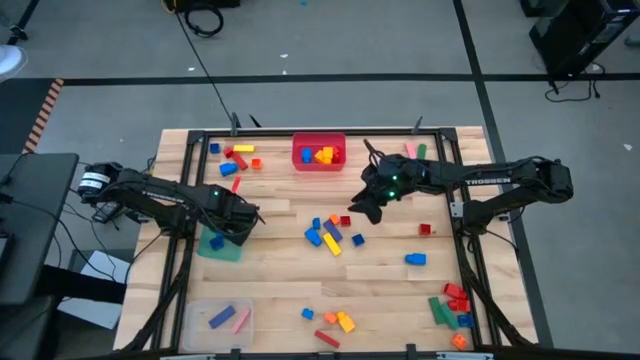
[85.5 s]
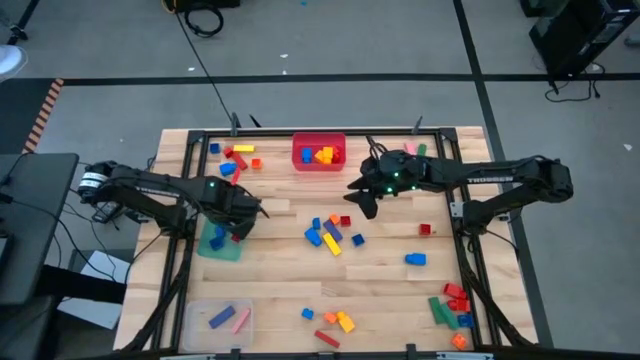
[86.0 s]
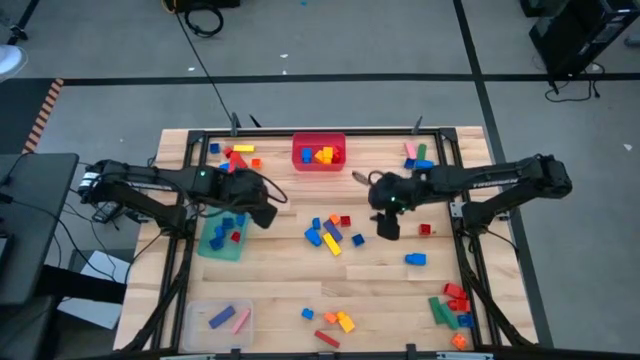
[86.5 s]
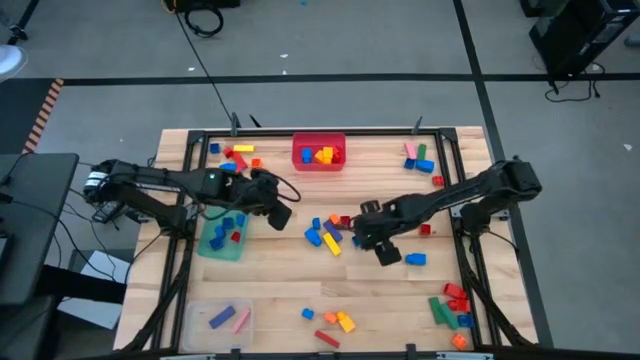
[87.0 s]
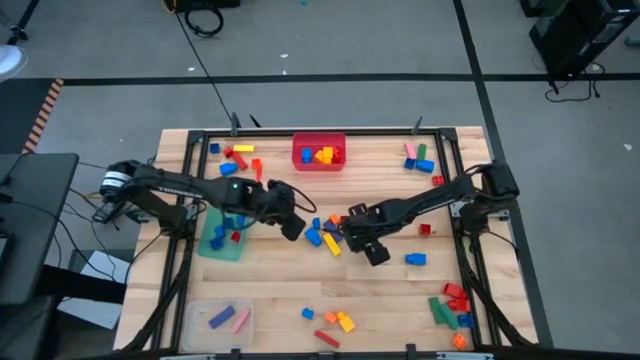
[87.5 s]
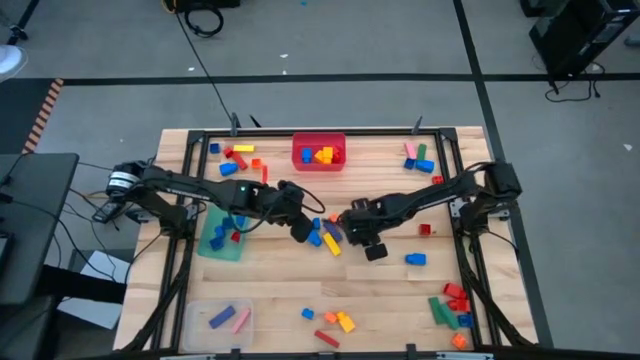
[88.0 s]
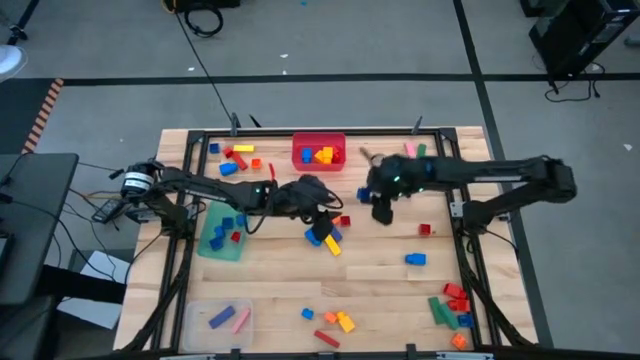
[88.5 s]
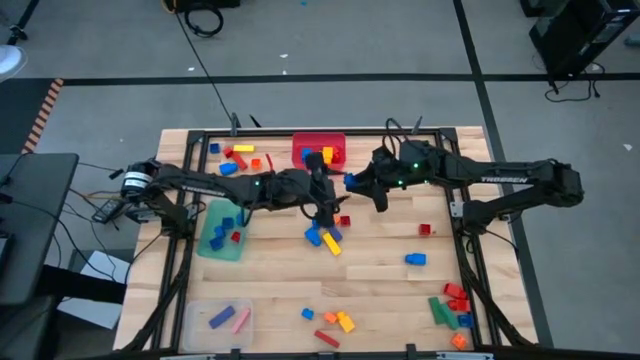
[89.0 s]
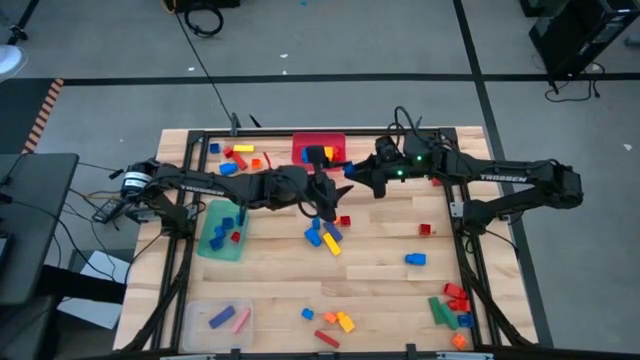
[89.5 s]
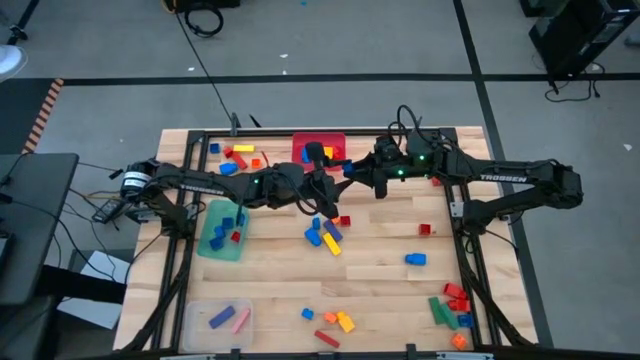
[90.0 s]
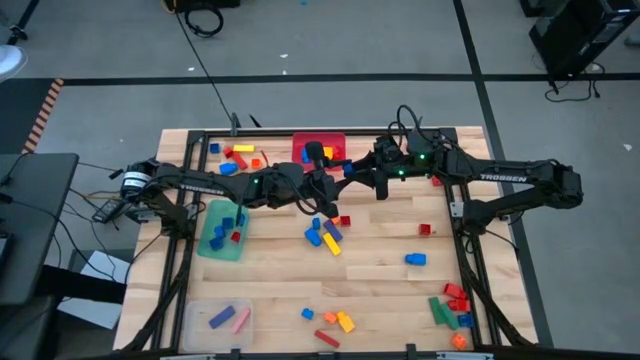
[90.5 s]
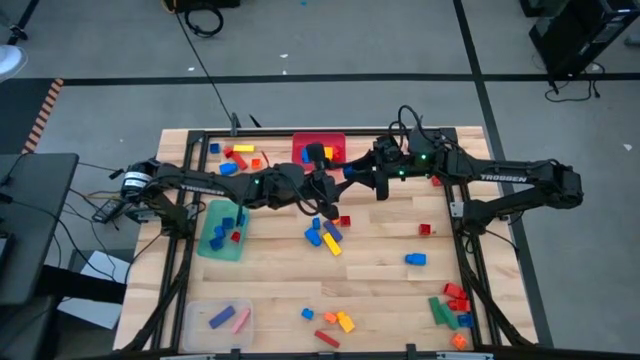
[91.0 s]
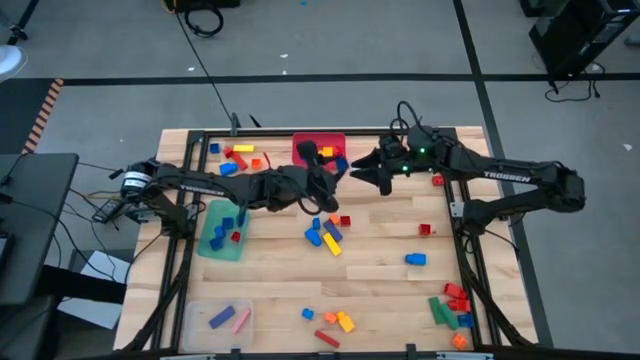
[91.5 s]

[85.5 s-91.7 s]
Task: Sort blocks by size
Put the blue 4 studded building block into the teal bin

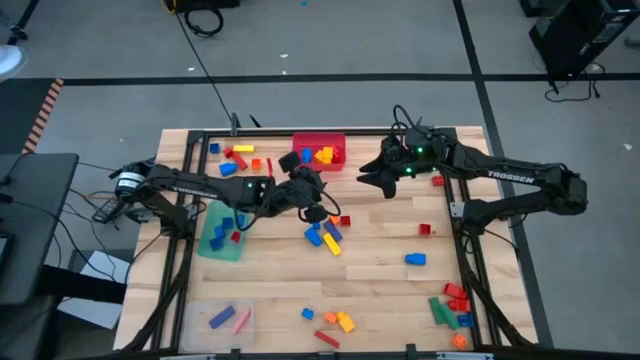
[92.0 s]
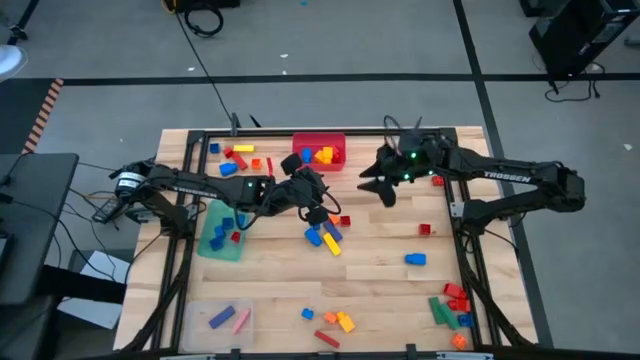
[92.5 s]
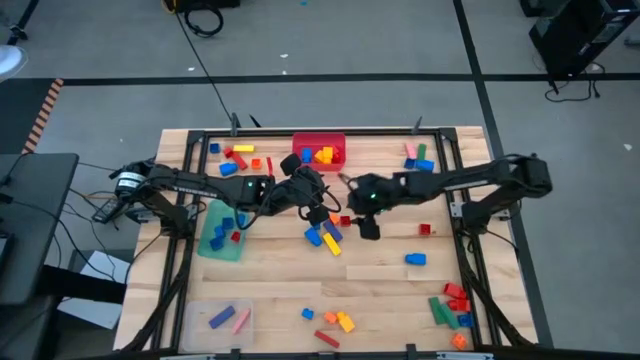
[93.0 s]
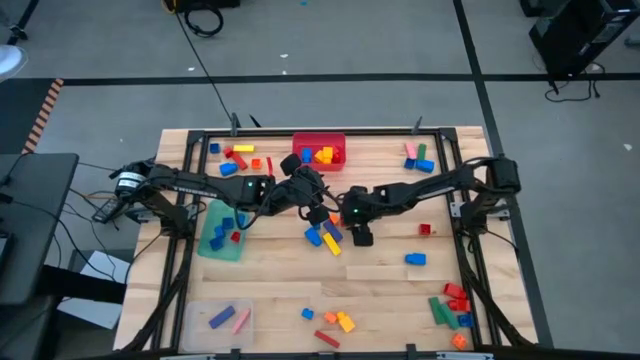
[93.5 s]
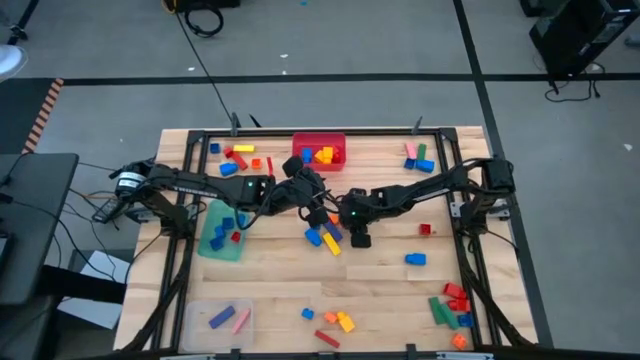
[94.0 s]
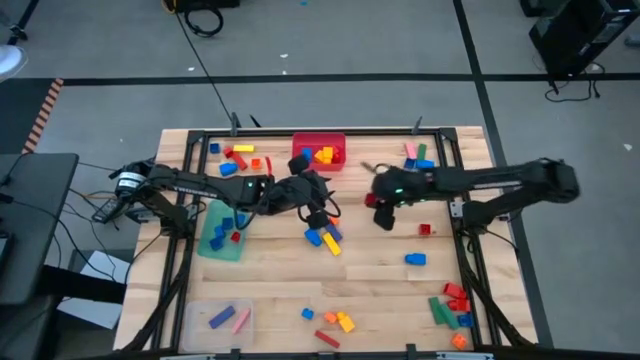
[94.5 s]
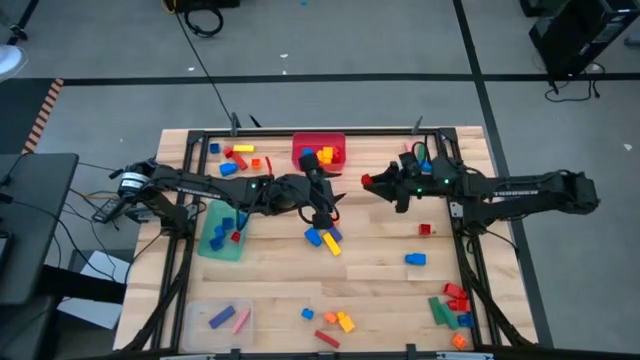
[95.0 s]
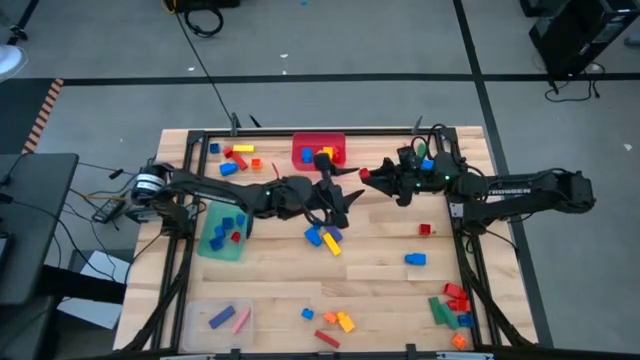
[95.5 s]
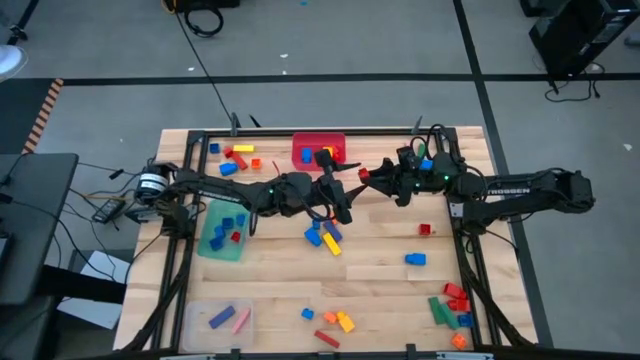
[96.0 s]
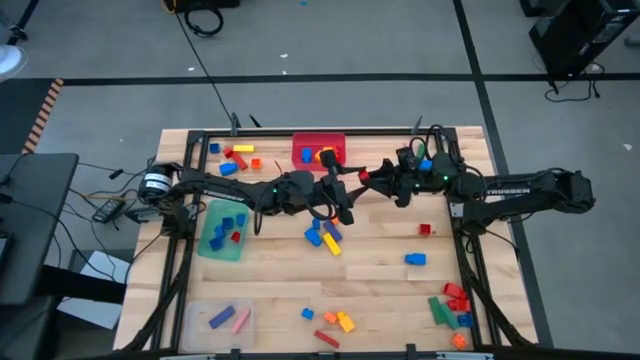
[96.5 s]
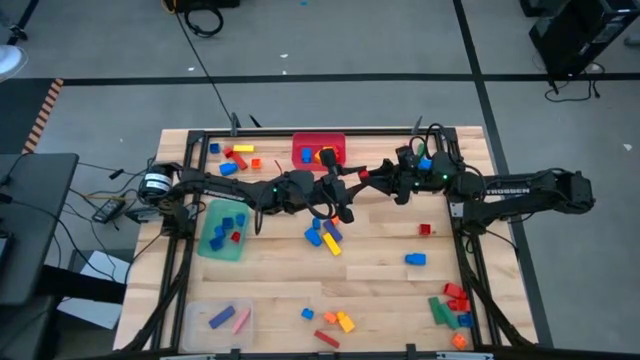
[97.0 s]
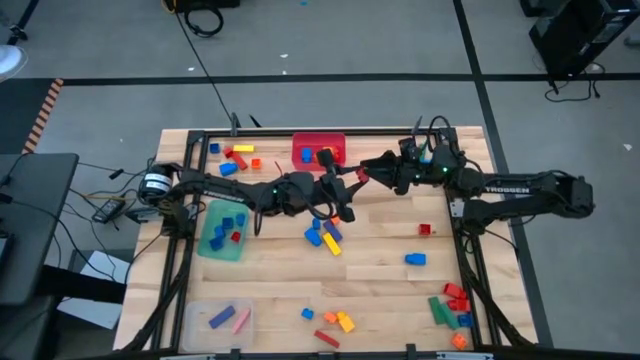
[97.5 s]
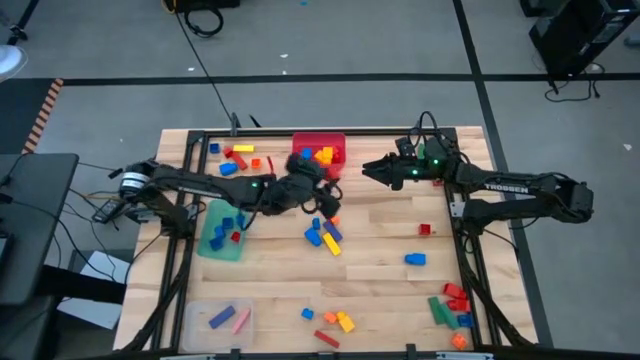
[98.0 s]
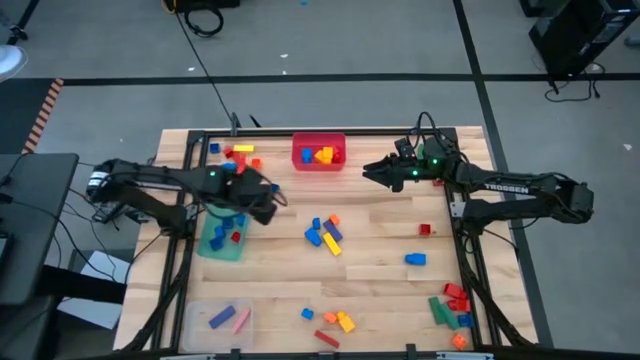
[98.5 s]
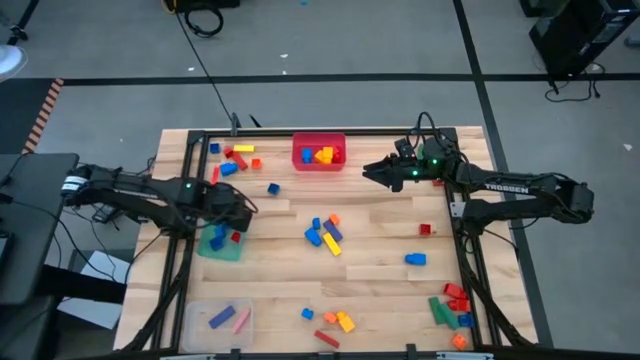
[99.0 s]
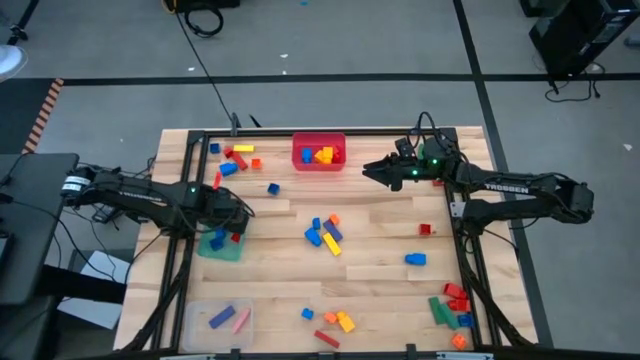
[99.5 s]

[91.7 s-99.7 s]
Put the red 4 studded building block into the teal bin

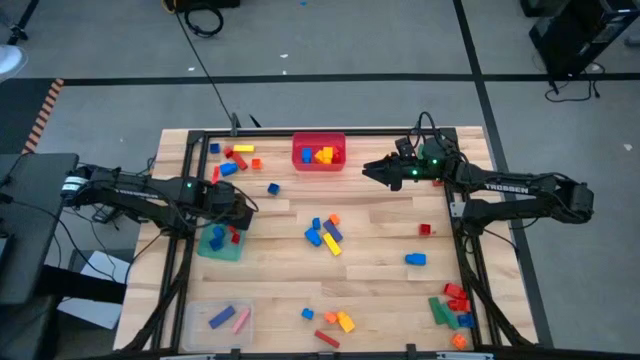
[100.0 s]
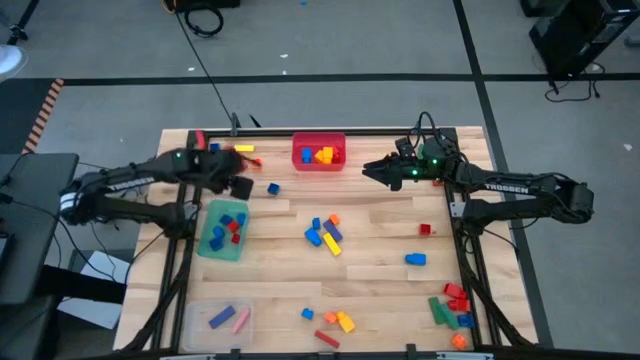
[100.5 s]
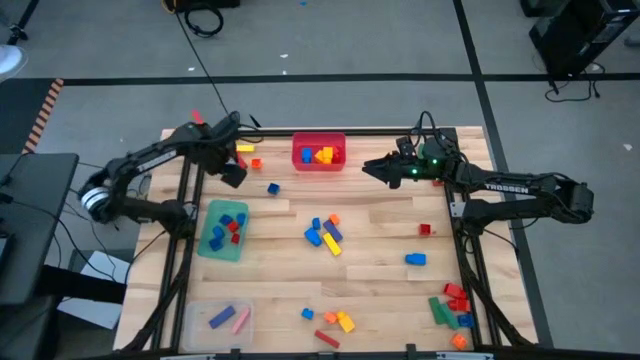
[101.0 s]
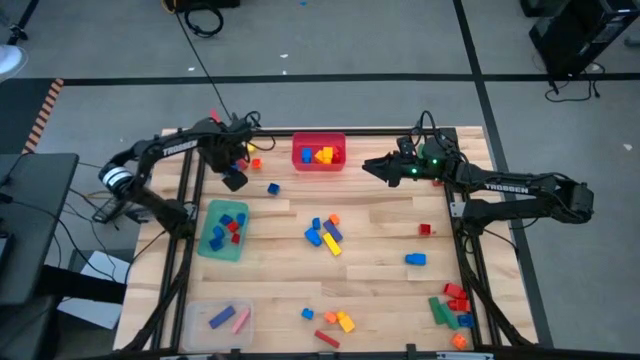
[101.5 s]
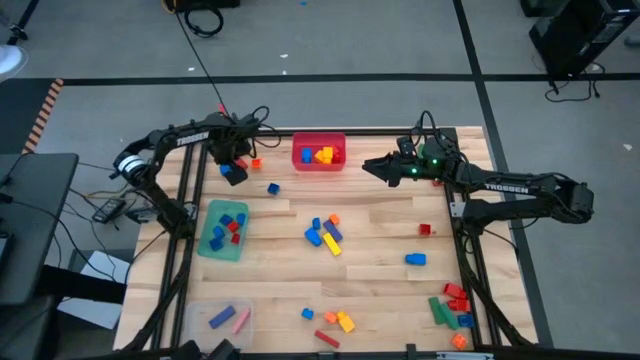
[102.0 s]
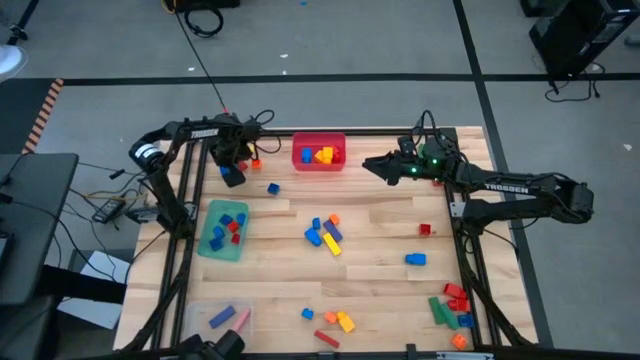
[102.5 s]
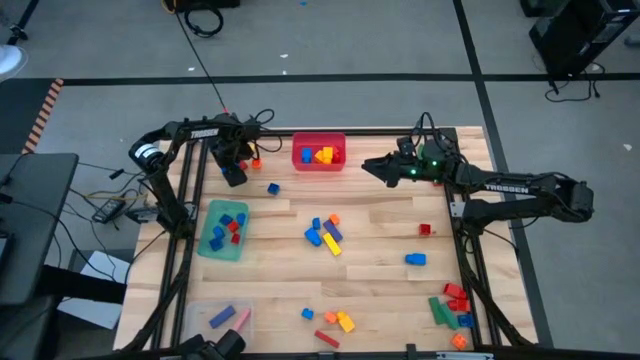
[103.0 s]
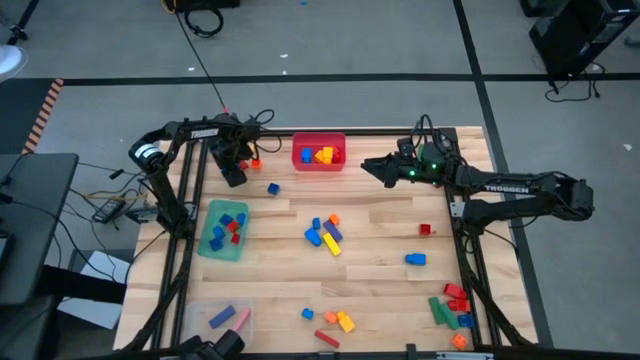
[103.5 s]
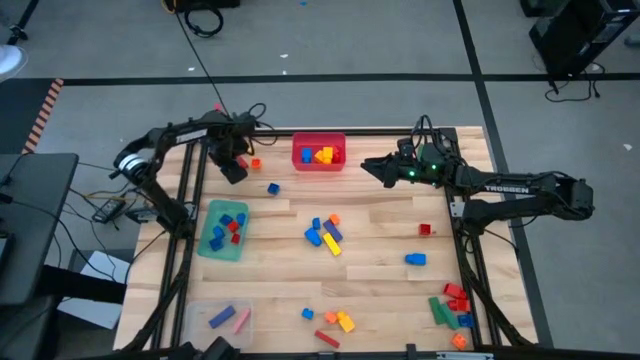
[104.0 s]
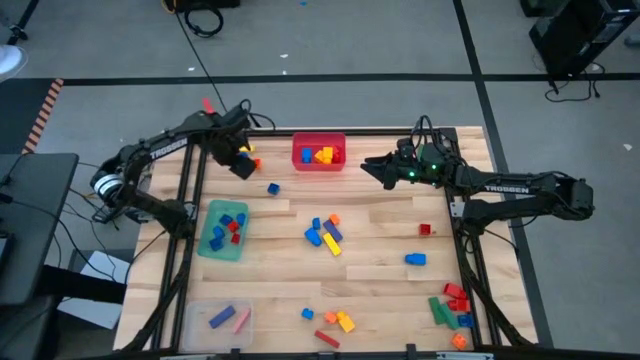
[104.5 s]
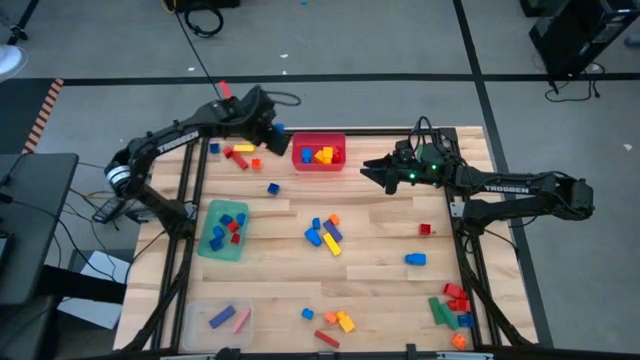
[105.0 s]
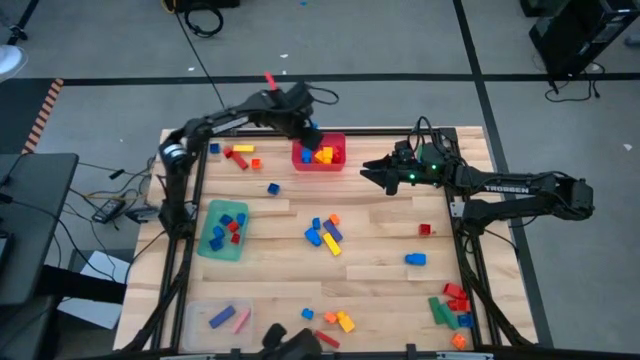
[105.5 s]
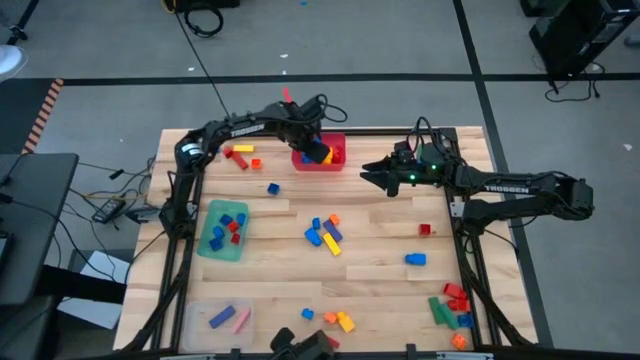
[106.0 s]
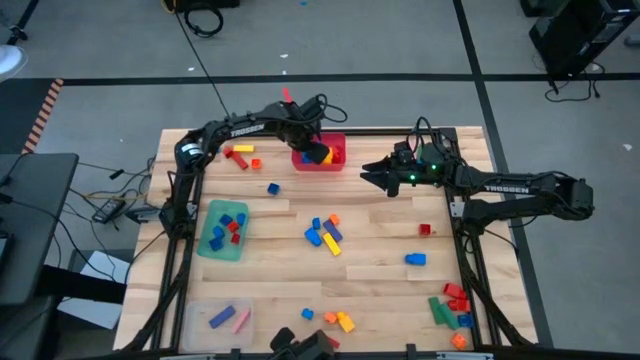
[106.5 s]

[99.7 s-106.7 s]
Put the blue 1 studded building block into the red bin

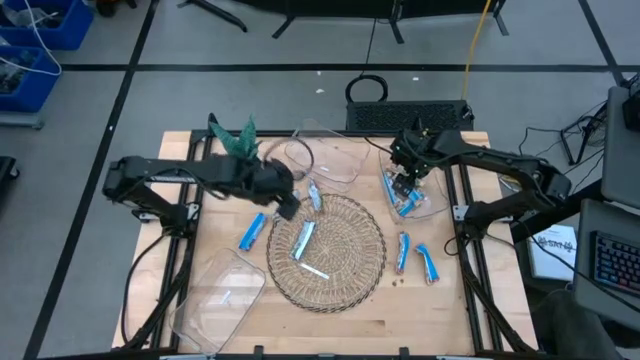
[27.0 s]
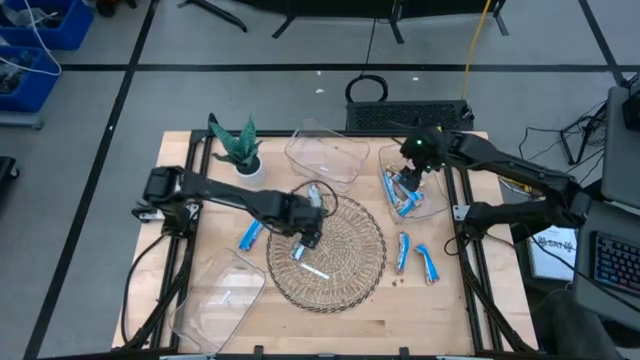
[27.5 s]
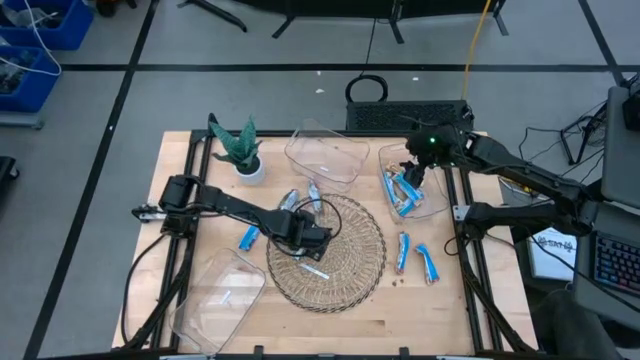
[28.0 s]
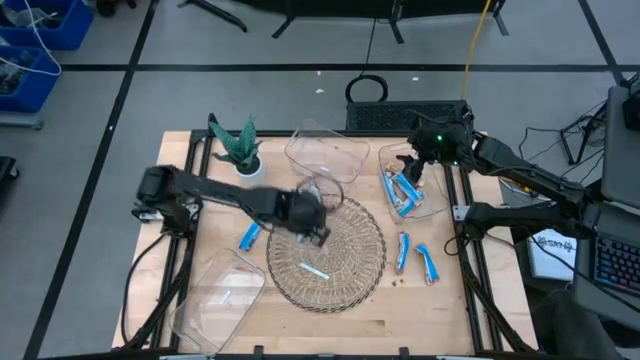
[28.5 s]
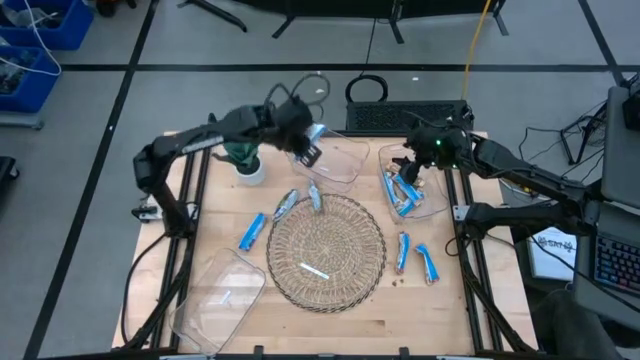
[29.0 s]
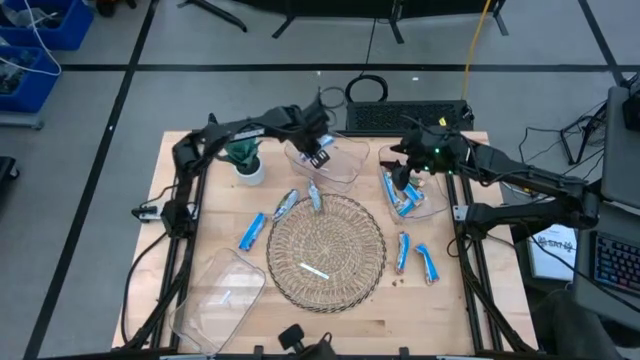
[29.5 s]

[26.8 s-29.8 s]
Task: Pick and place Granola Bars by type
Put the right blue granola bar into the top left transparent bin
